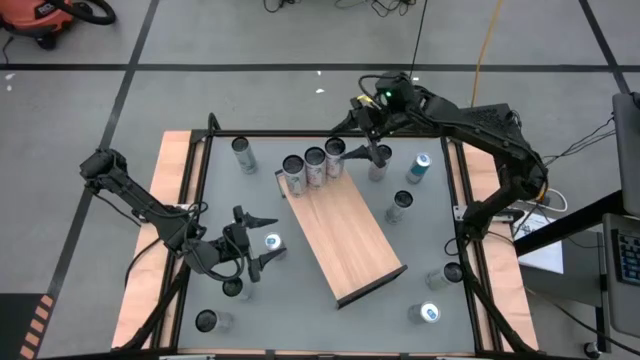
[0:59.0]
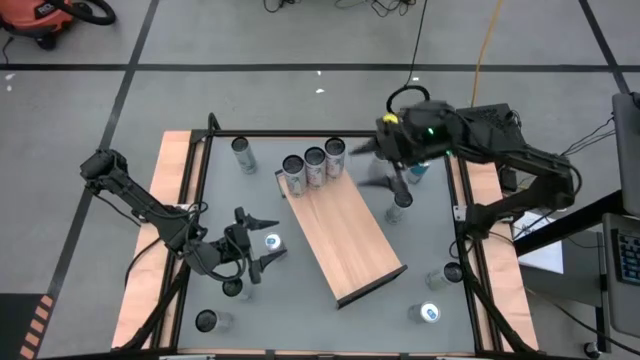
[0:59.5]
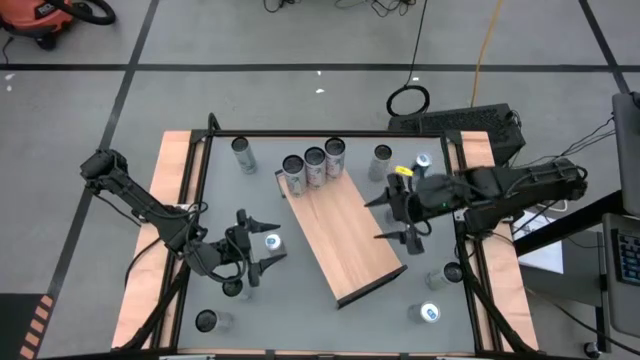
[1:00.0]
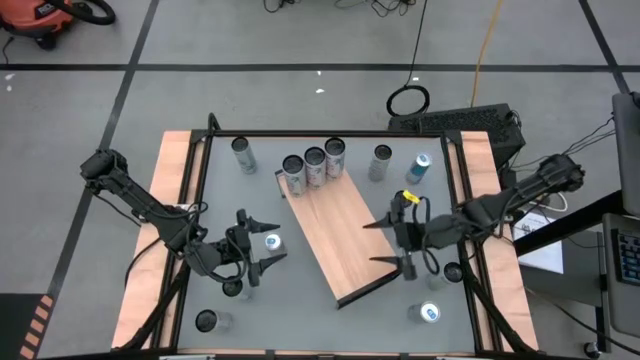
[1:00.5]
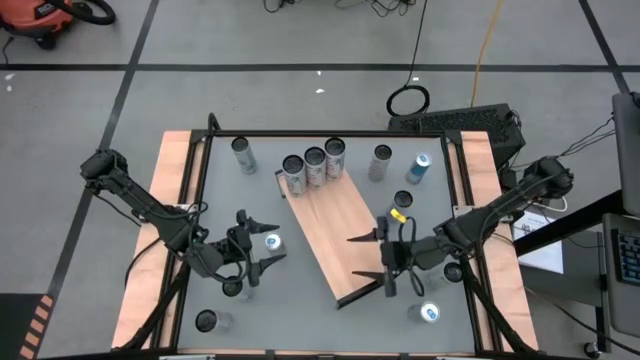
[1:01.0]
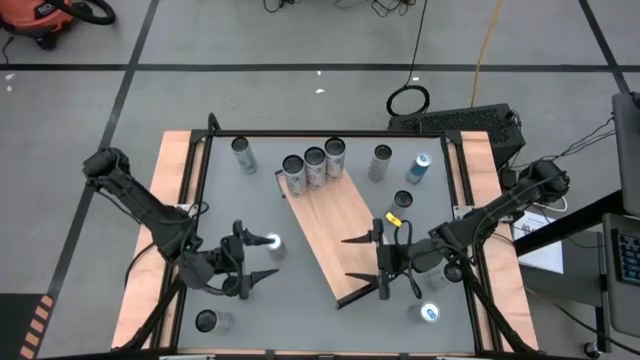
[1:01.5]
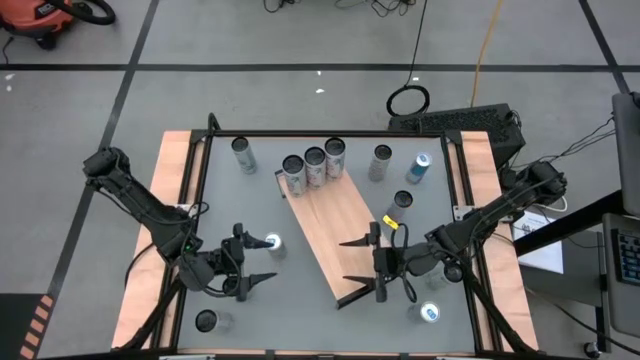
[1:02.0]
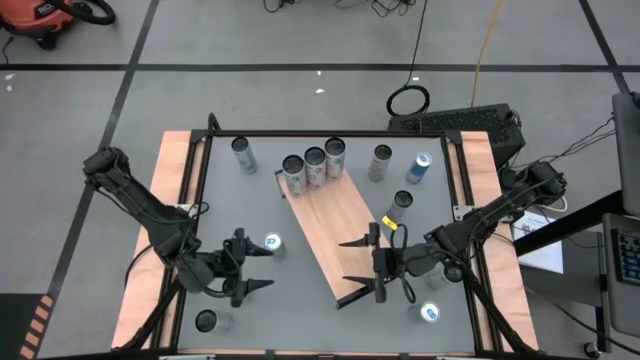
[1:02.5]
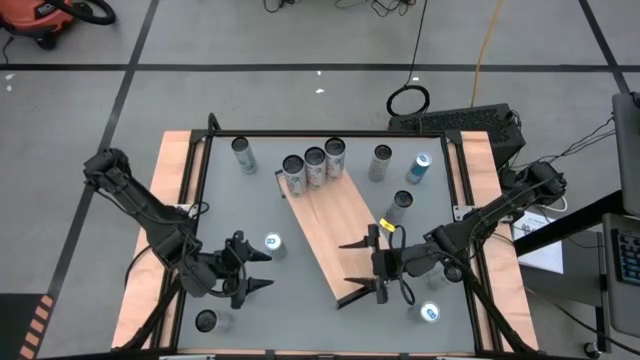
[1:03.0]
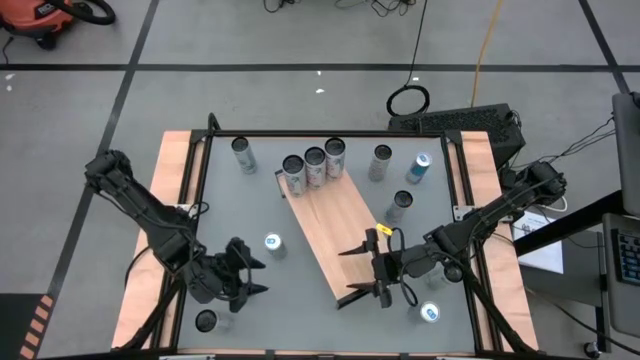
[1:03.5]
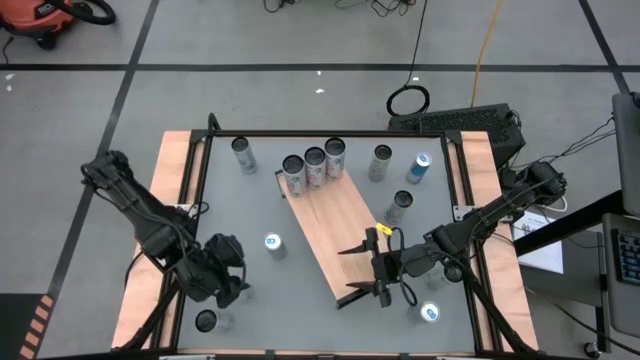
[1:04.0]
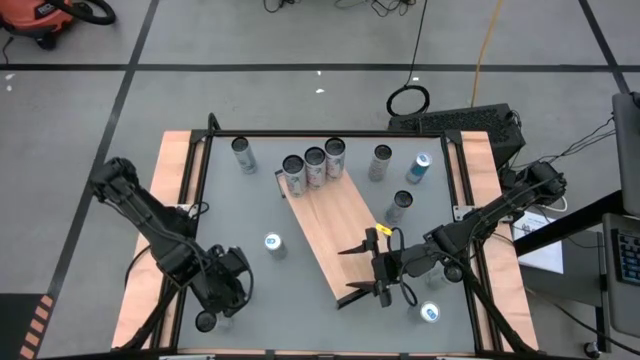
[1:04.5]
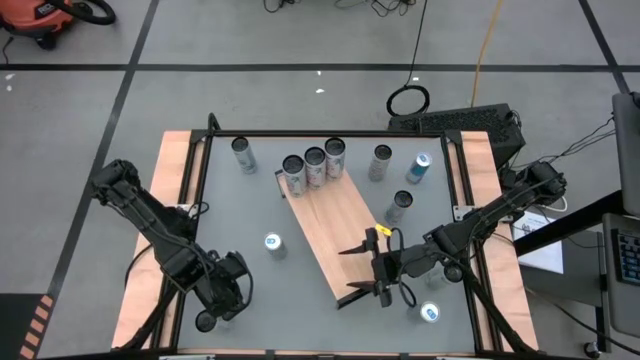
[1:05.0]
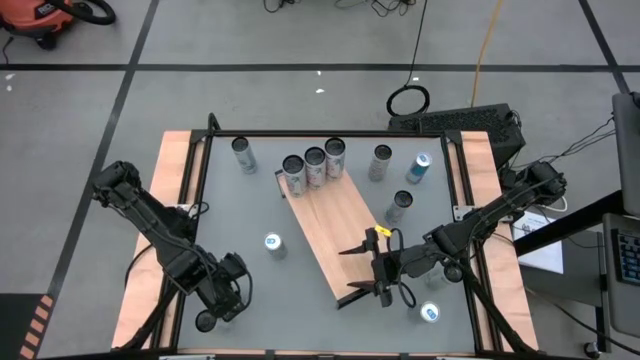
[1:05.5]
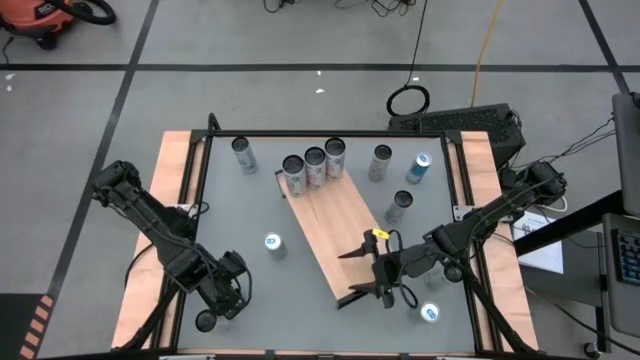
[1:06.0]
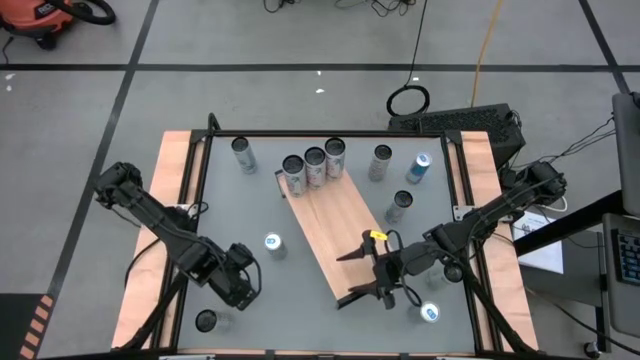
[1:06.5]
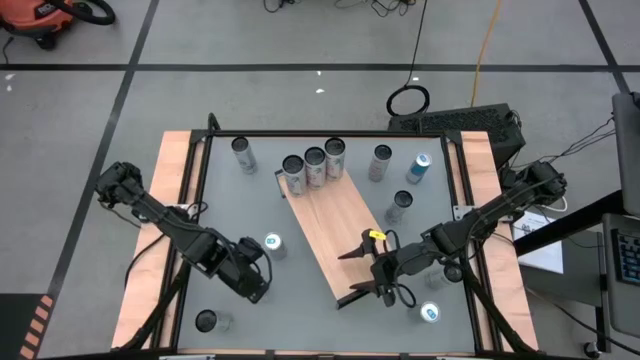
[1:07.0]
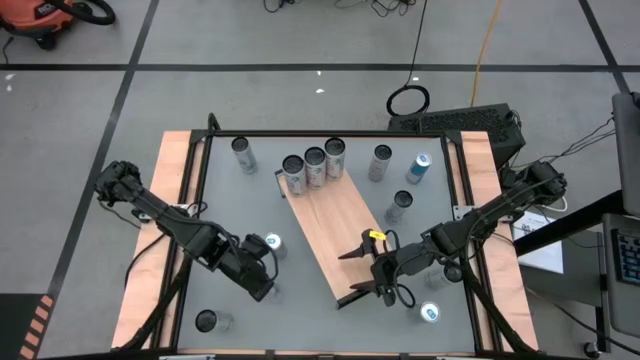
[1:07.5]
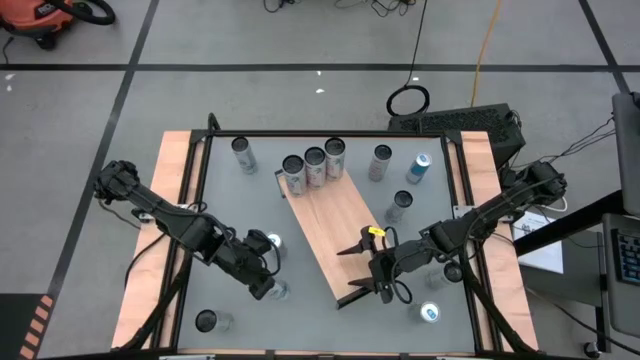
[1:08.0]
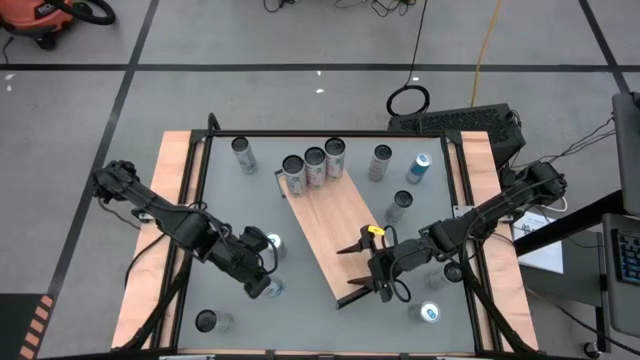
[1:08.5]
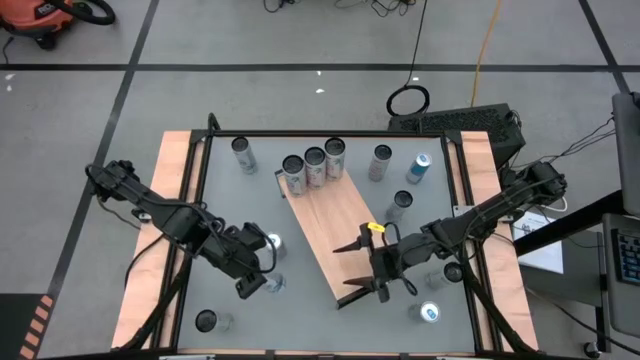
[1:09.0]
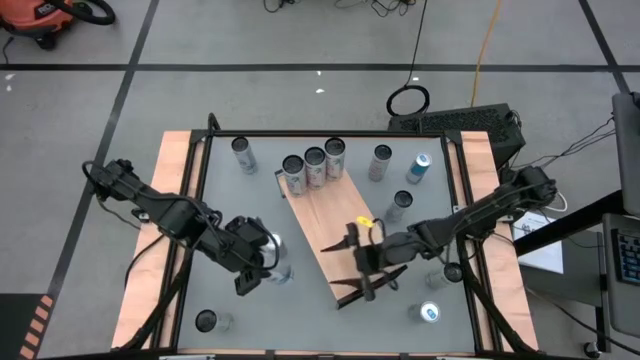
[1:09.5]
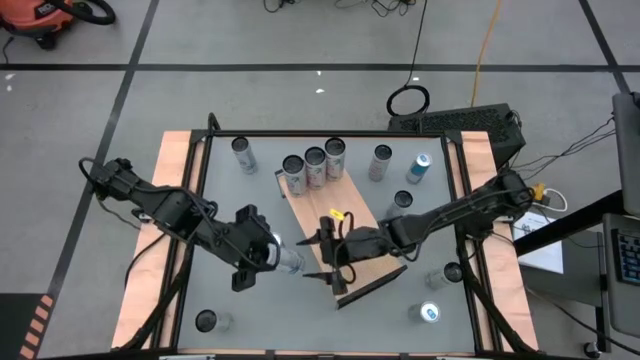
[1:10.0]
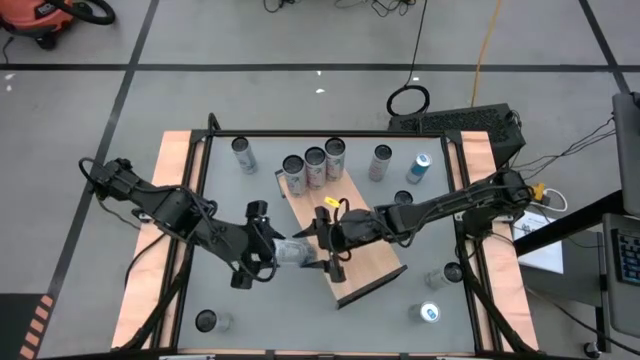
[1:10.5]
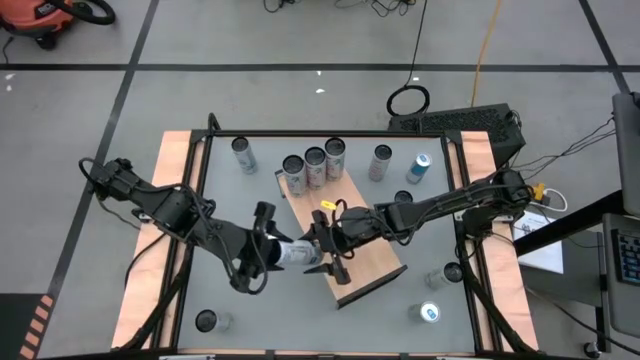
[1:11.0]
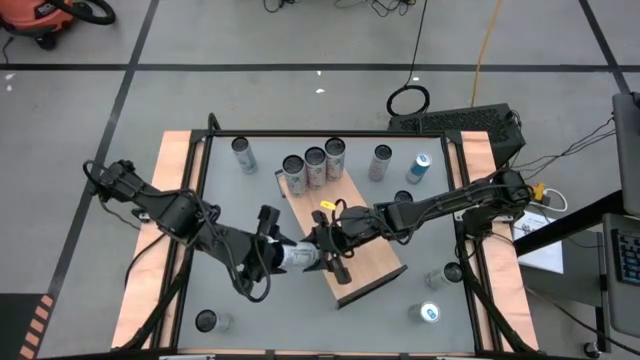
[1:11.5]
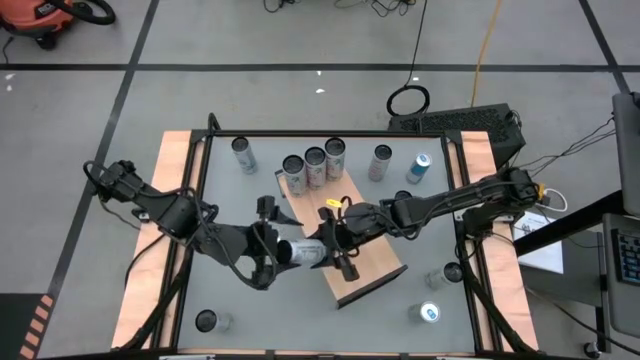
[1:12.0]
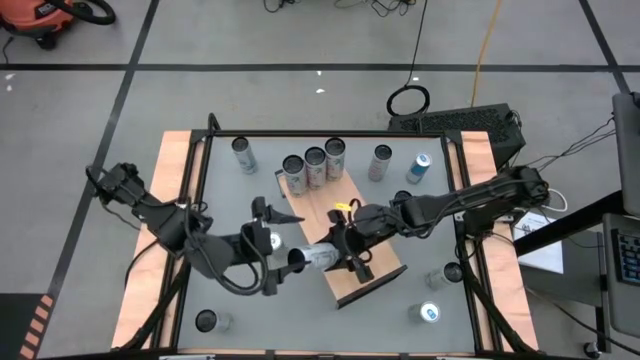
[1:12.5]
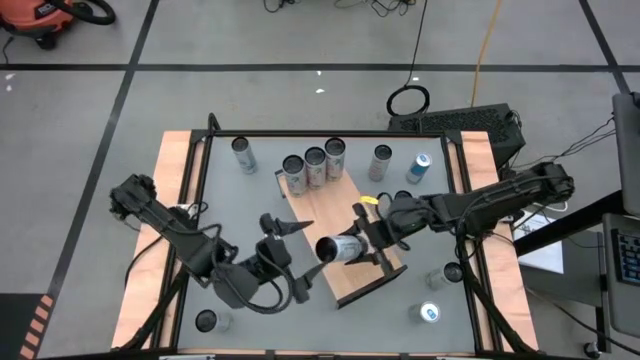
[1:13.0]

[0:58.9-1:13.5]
Task: Place canned beverage on shelf
Put the bottom left white-blue soda can on the shelf
